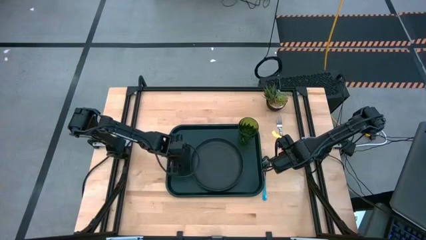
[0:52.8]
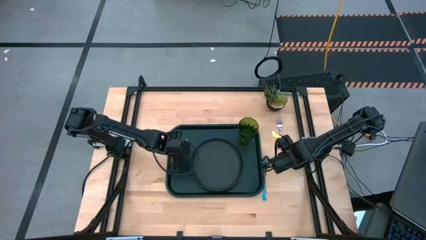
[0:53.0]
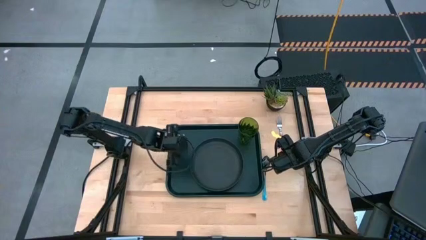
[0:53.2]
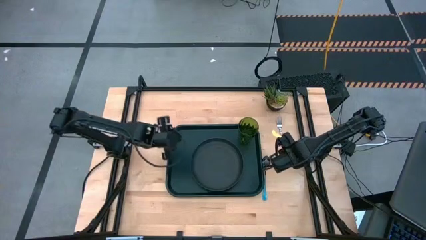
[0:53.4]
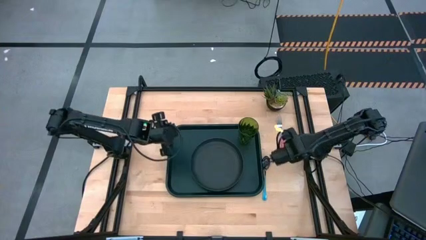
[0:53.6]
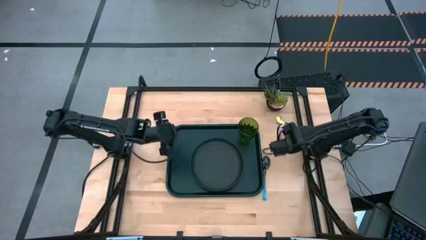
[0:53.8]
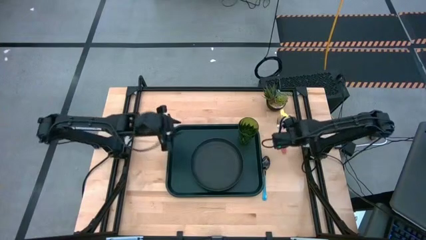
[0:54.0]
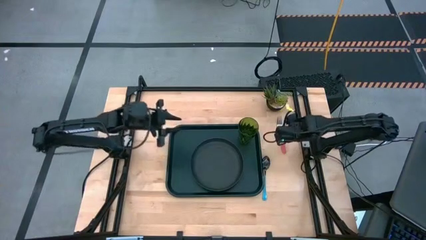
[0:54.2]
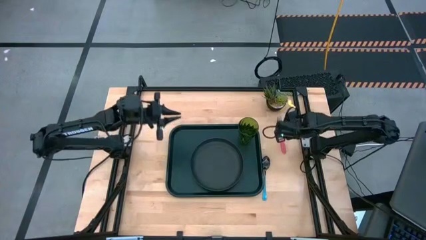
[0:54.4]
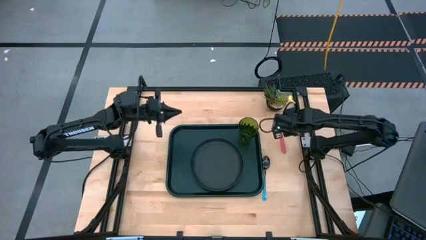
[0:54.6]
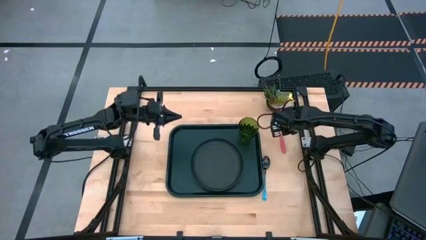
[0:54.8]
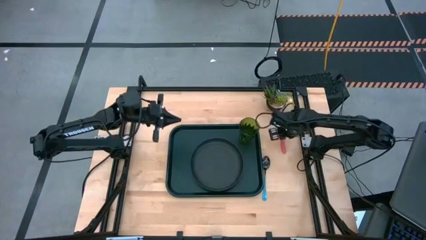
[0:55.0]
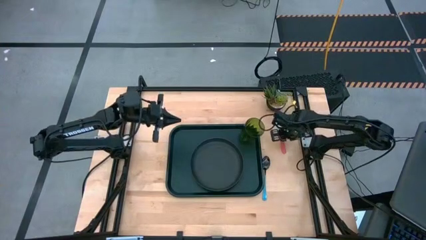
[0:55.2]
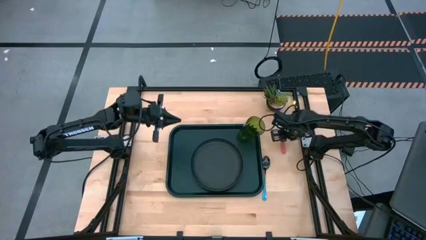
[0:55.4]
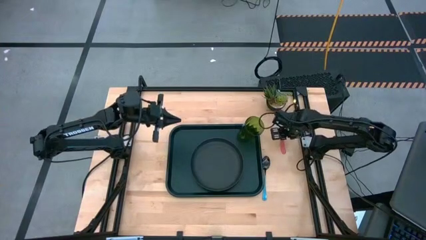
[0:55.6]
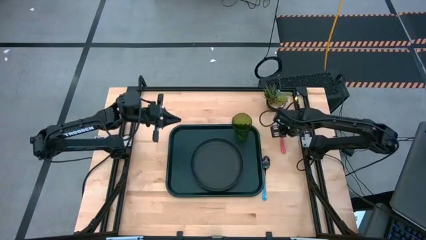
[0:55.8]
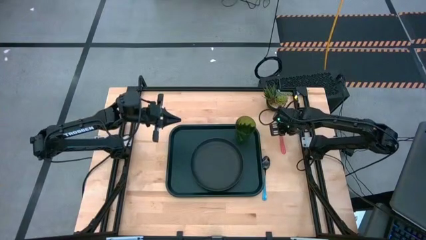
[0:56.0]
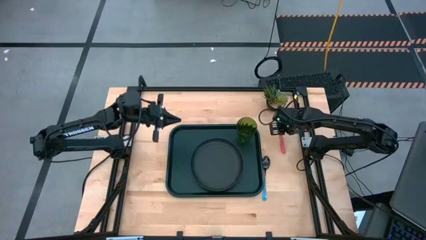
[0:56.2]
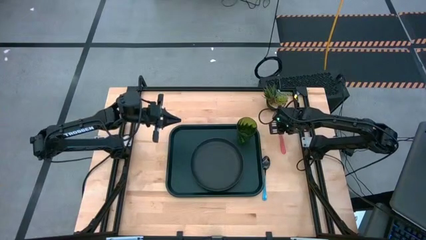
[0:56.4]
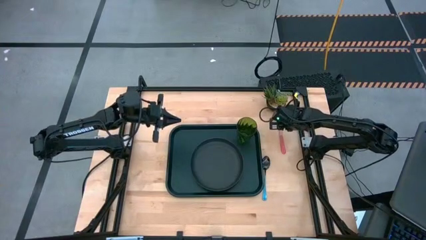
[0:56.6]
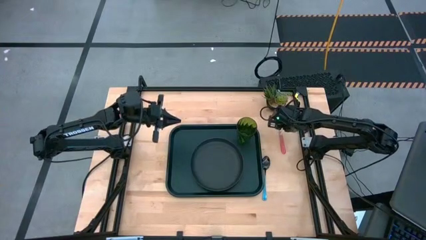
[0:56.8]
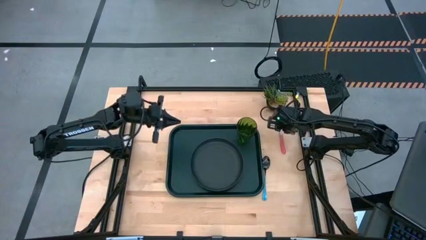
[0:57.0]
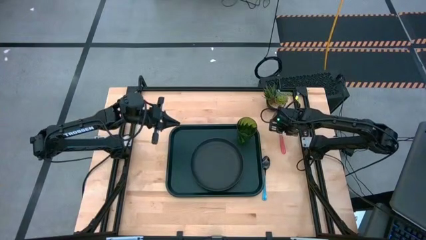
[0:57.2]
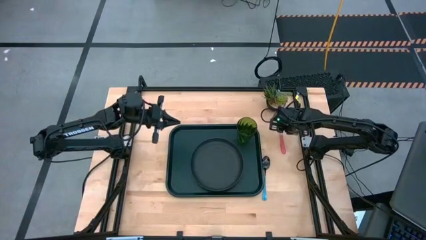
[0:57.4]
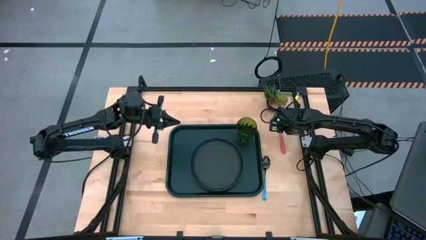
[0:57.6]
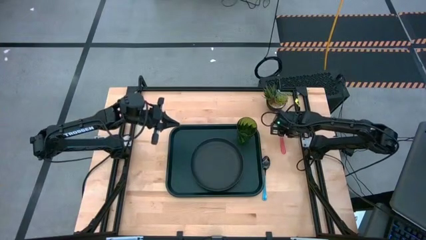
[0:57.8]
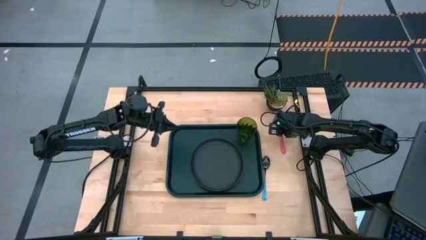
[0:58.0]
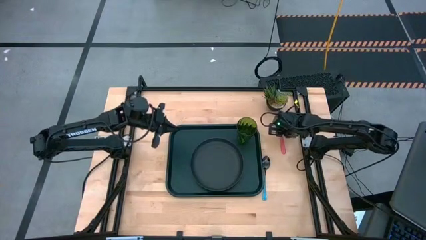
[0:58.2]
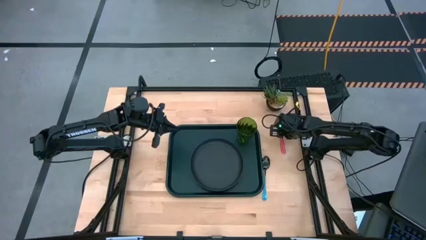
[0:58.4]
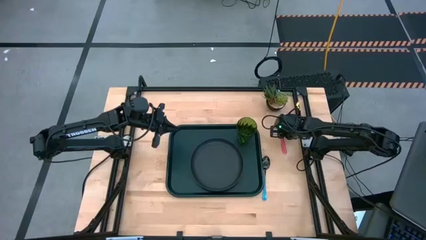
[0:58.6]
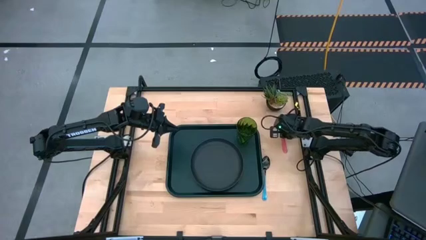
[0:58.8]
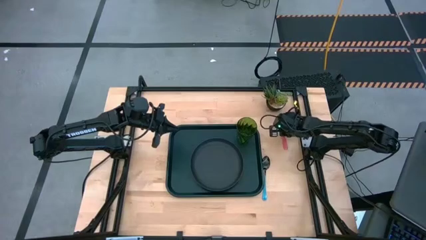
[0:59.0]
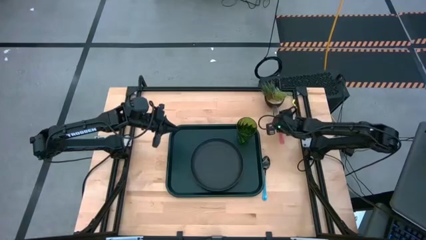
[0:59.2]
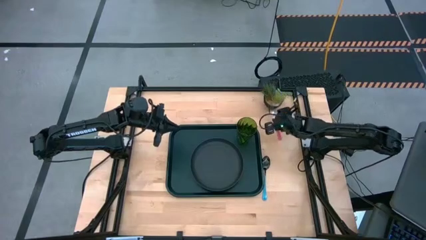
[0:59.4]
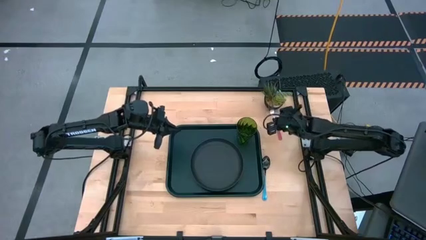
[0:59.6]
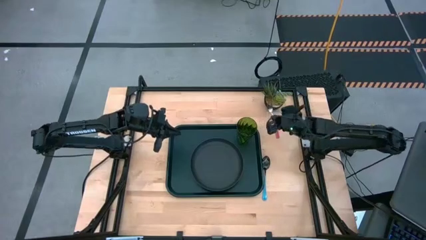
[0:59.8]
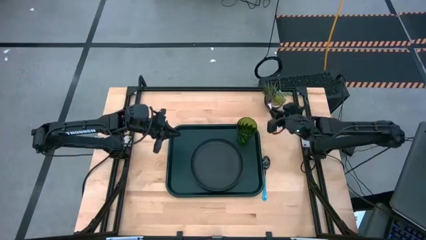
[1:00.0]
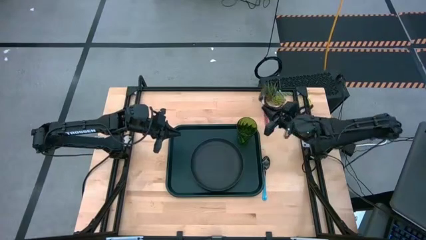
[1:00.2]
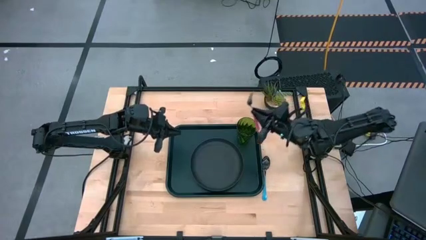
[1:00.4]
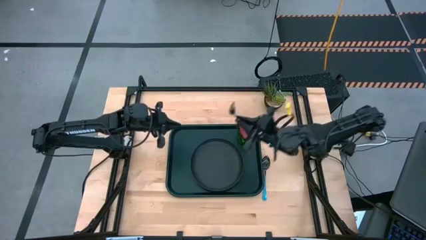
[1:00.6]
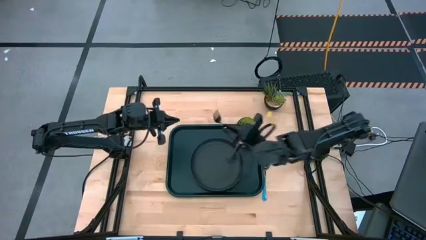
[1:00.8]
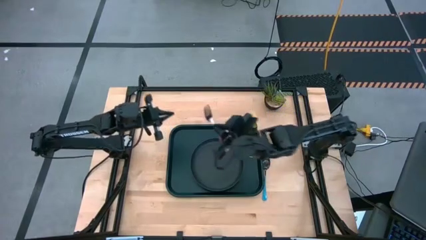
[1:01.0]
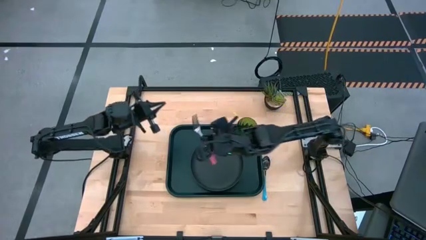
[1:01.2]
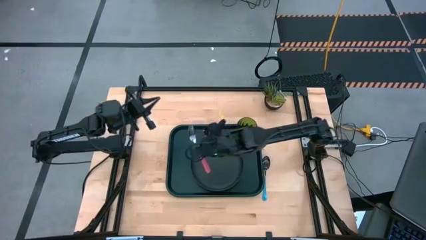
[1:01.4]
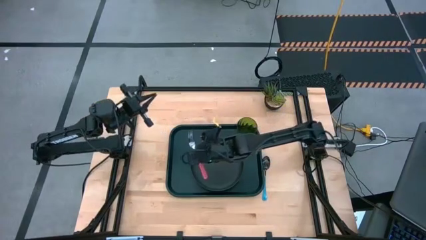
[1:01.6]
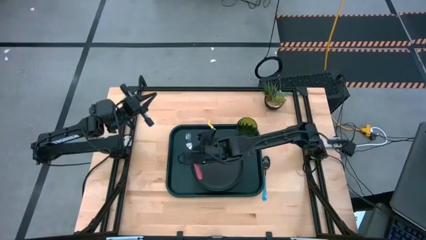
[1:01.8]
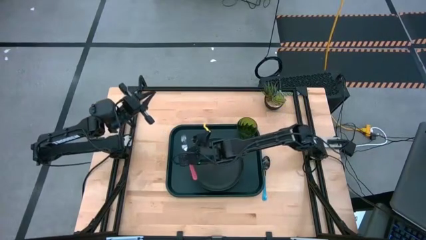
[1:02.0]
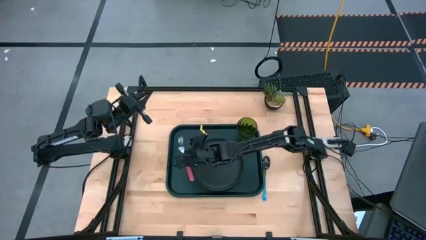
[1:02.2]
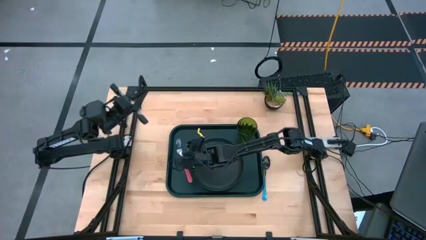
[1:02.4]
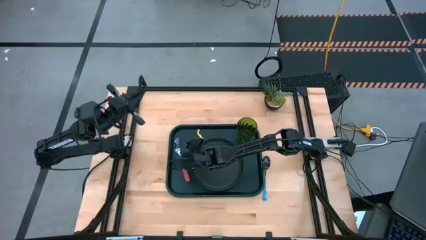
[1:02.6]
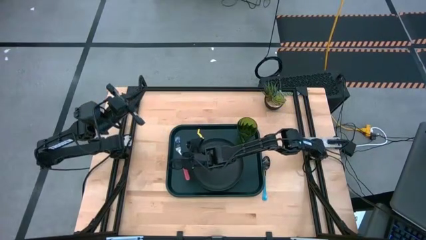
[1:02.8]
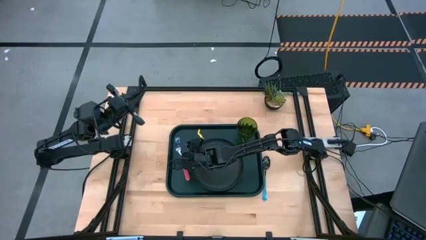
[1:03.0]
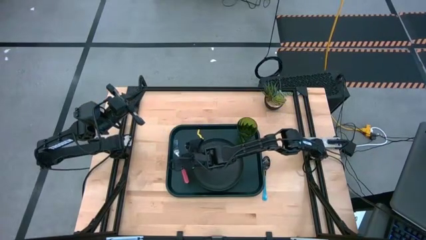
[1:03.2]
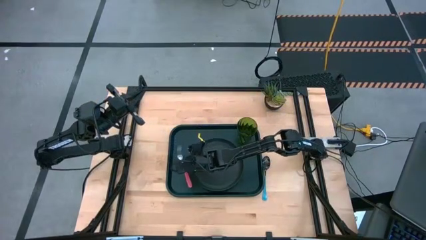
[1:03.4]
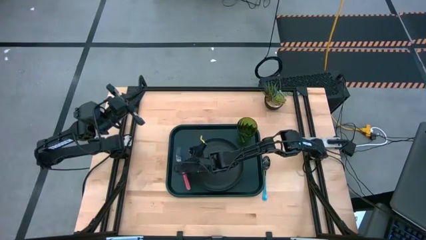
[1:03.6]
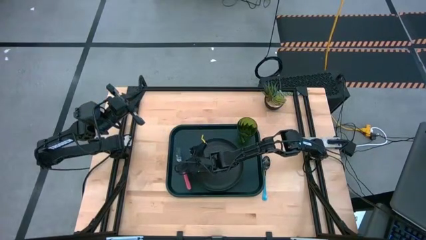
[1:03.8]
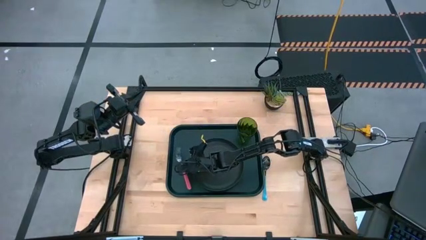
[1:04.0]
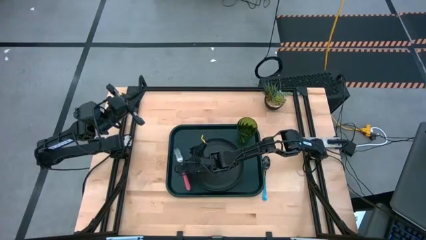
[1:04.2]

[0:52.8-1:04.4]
Task: Pick and place plate/cup/fork/spoon on tray
Put the pink fork to the left of the black plate on the black tray

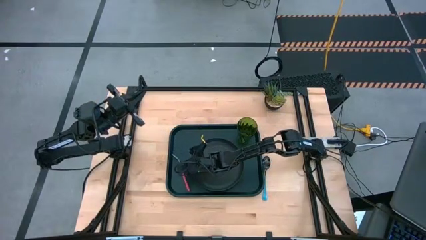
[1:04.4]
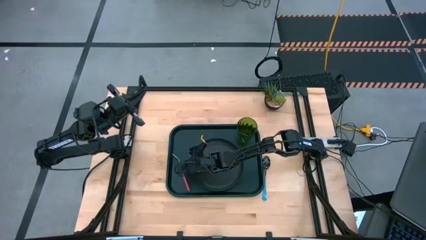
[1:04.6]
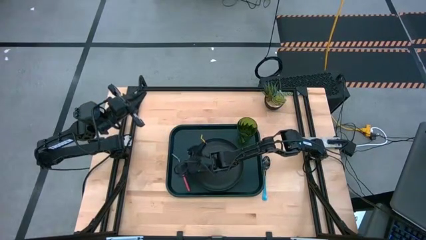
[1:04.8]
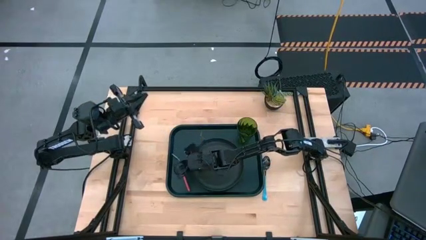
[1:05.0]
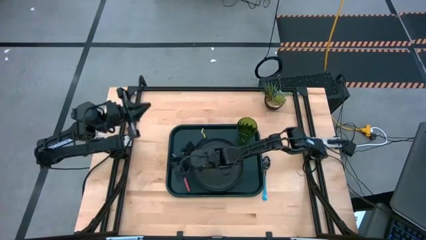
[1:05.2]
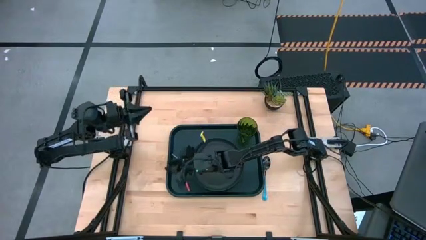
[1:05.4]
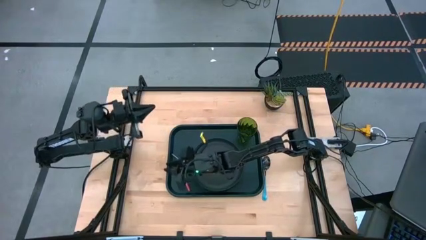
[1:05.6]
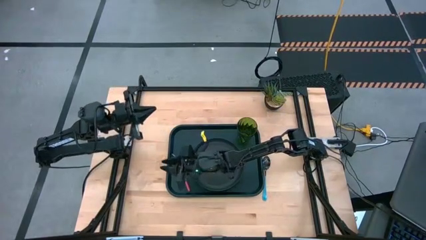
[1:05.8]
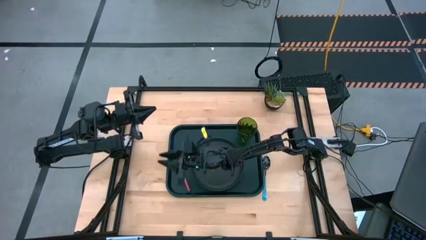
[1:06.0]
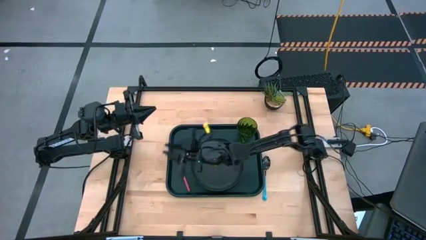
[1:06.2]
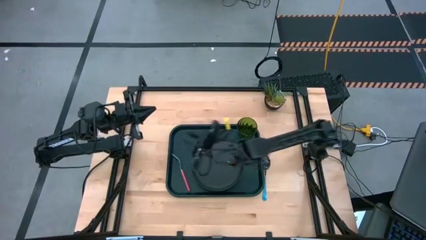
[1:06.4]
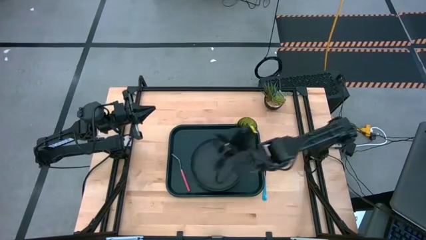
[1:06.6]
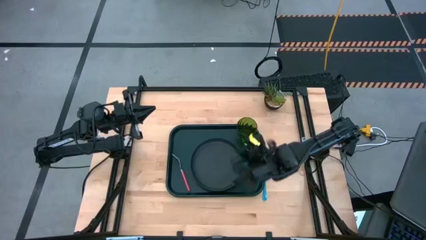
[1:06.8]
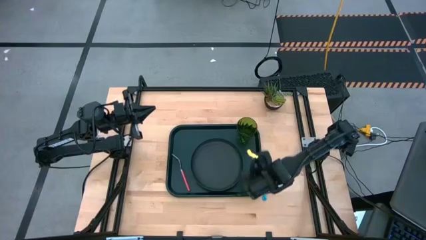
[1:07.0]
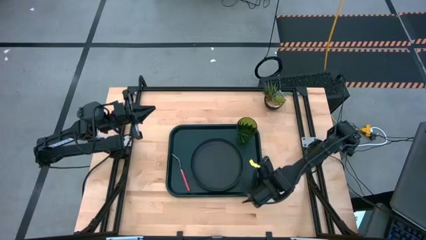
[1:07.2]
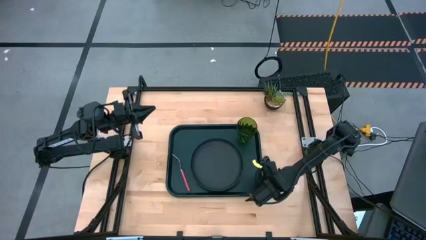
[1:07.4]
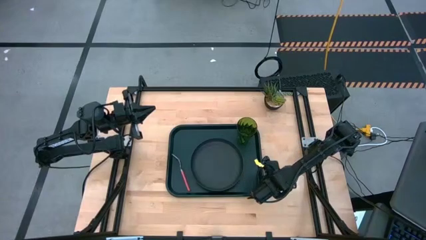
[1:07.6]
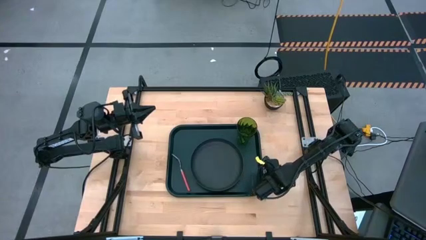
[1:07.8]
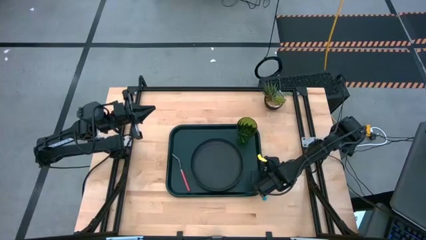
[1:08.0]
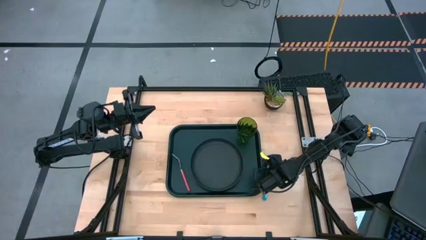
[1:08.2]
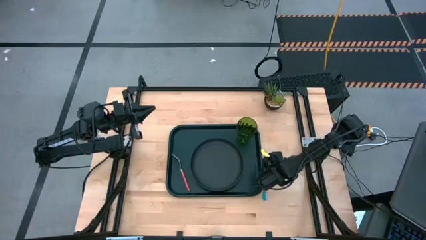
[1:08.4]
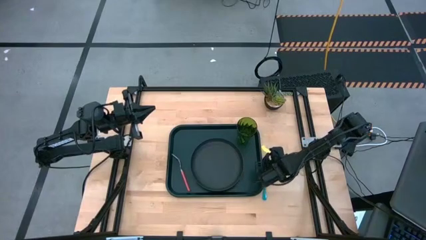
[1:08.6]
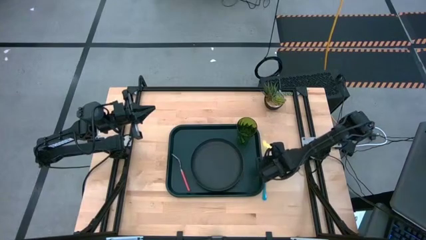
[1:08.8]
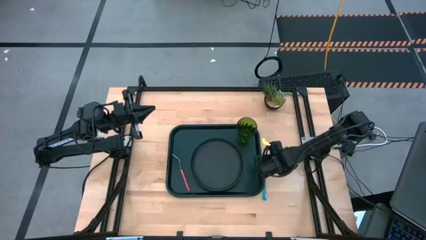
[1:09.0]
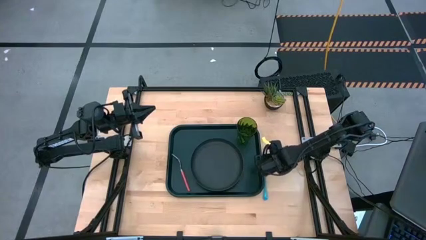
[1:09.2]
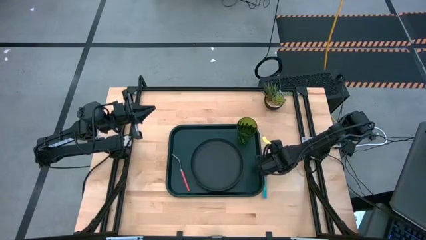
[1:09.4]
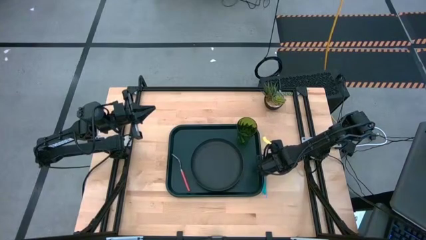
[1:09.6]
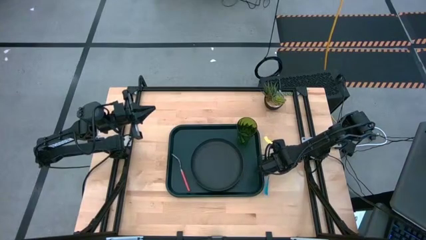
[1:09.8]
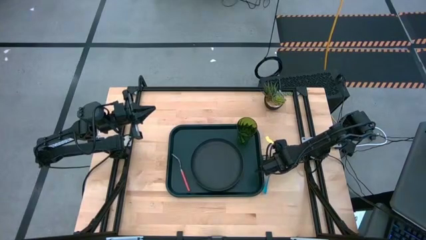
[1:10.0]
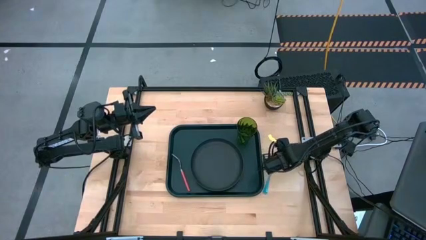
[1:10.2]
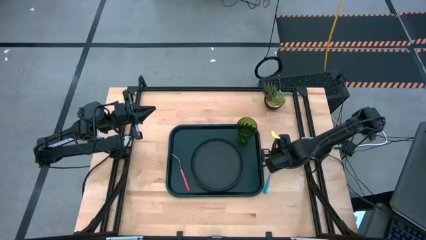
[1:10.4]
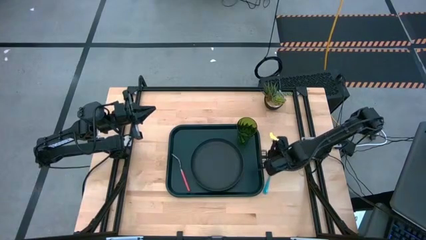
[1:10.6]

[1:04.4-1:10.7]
Put the blue spoon to the left of the pink fork on the black tray
